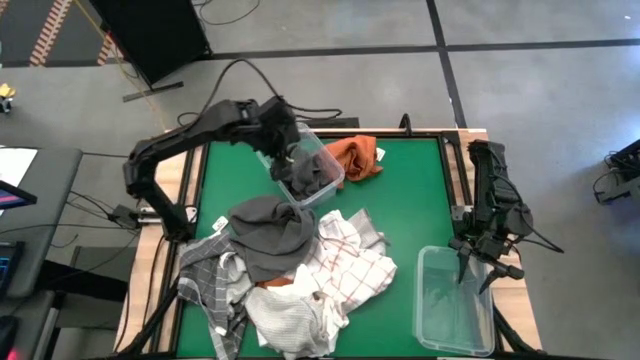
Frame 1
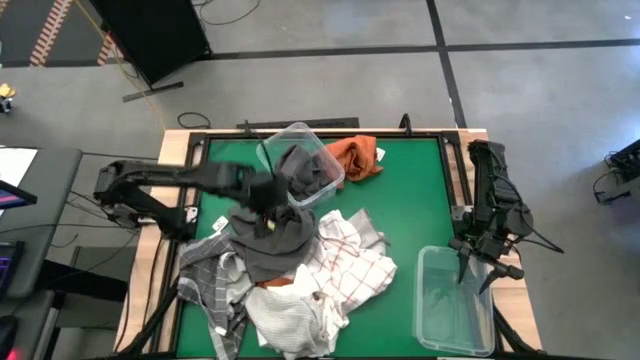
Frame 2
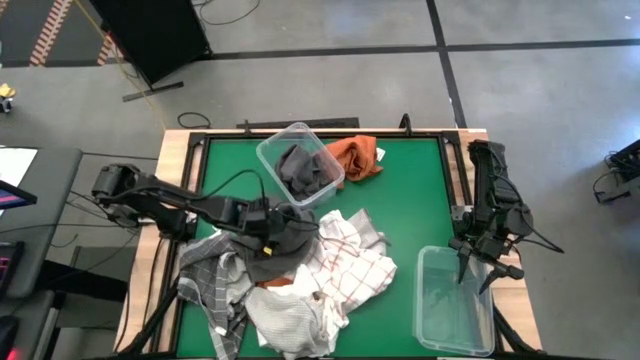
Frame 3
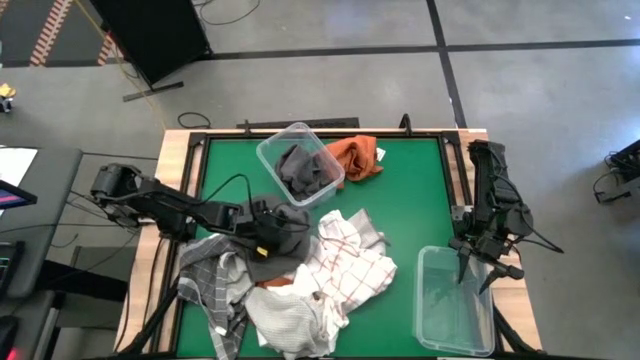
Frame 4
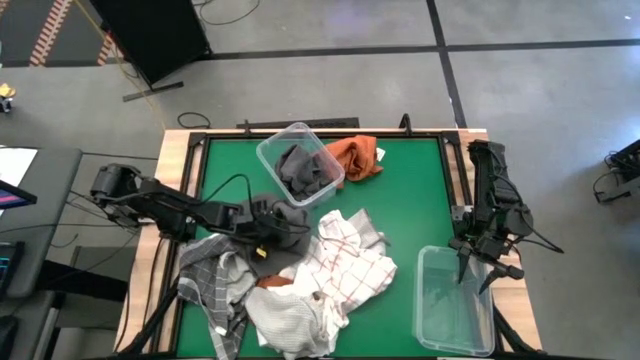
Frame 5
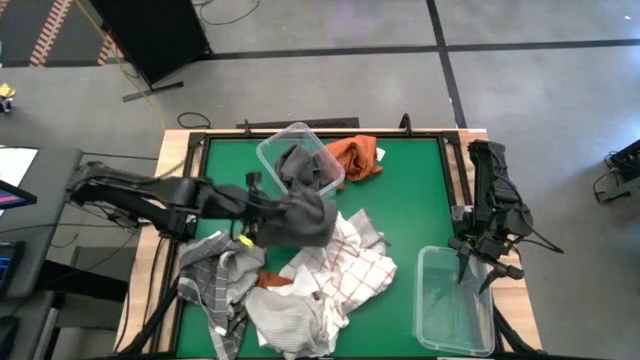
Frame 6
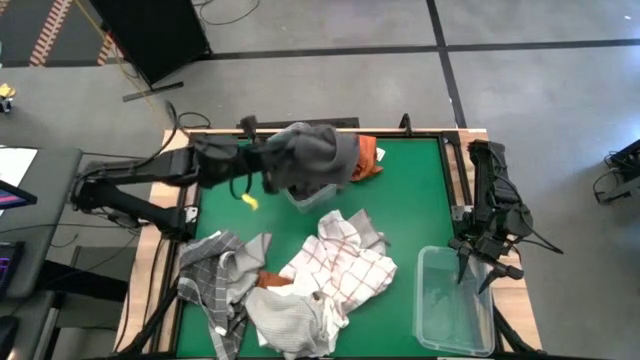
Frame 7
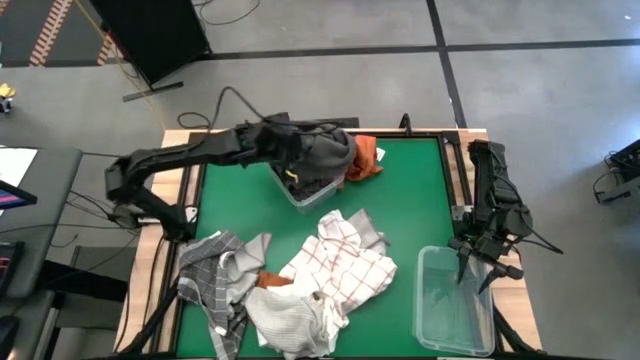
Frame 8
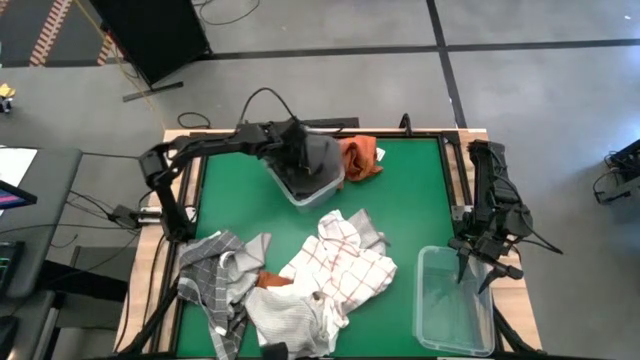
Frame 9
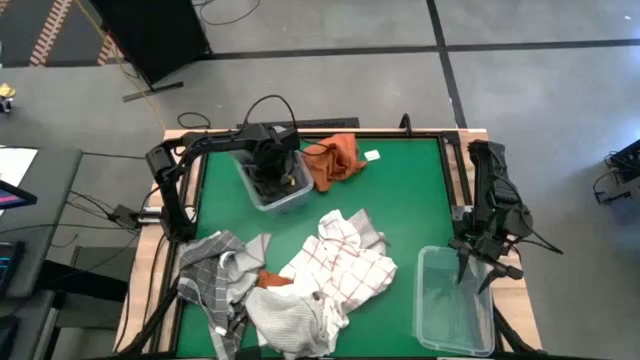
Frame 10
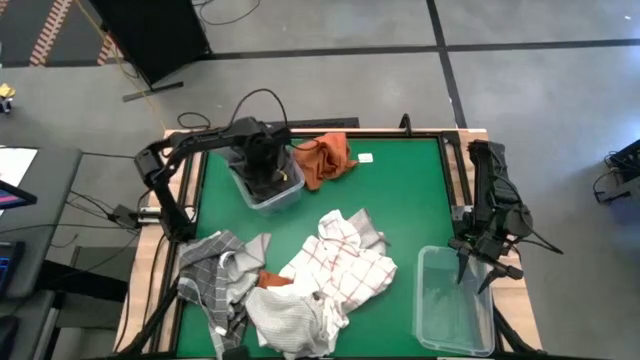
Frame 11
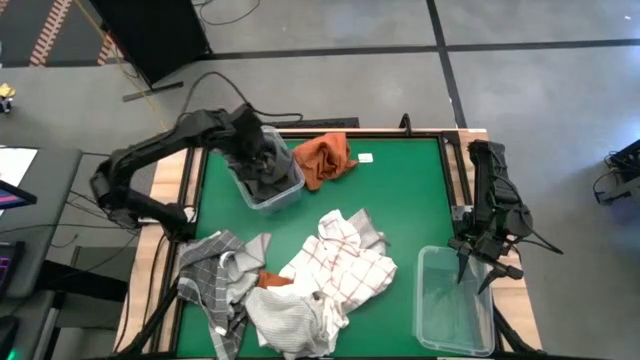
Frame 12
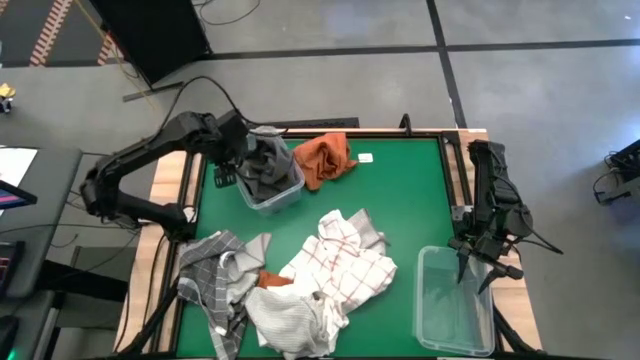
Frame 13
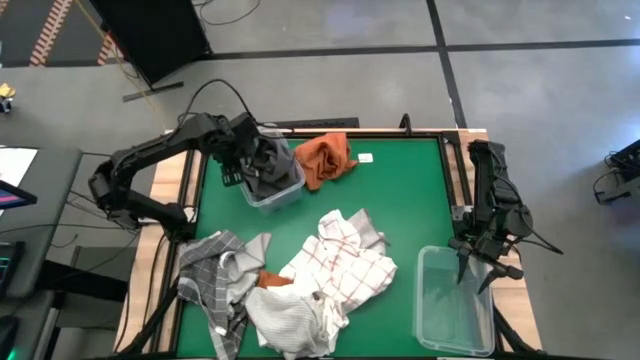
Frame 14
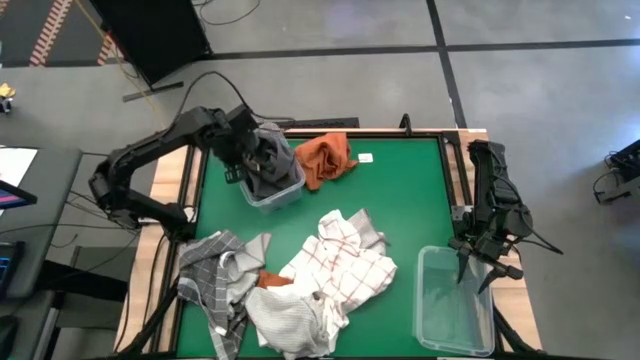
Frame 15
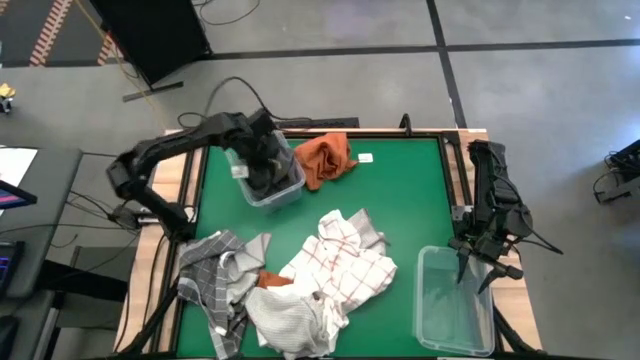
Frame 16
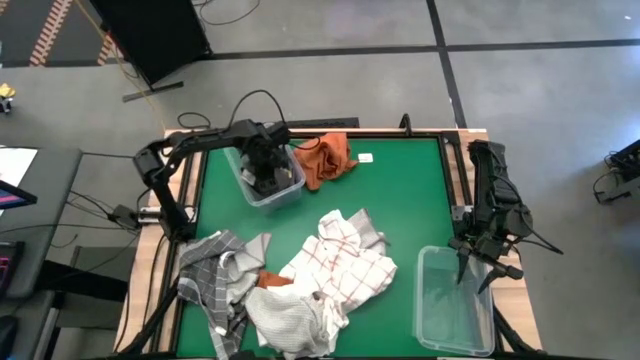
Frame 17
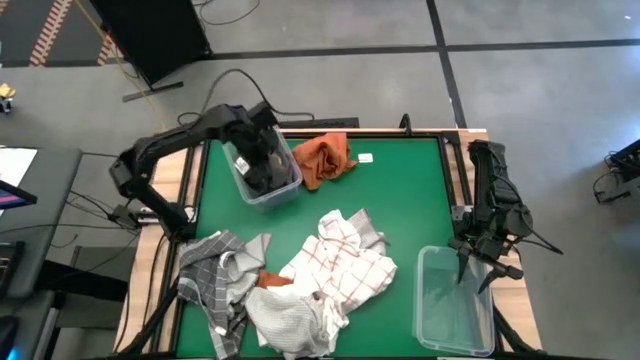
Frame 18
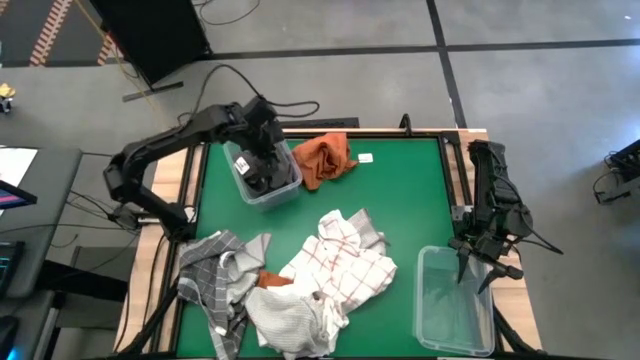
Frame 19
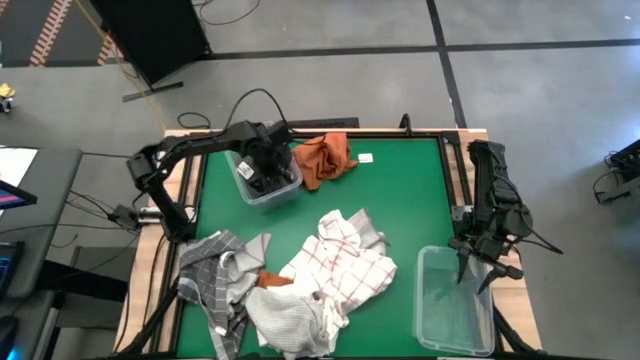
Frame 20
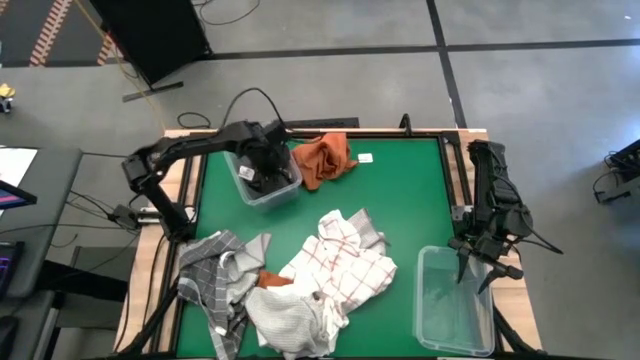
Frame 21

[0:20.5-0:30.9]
Task: Sort towels by color in basket
Put the gray towel into the top transparent bin

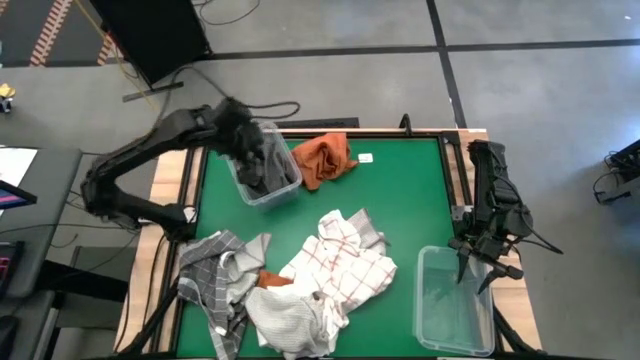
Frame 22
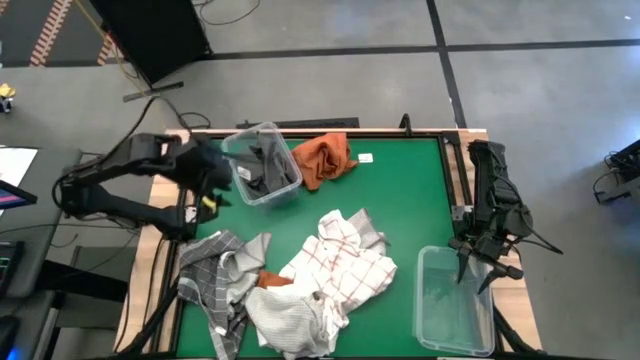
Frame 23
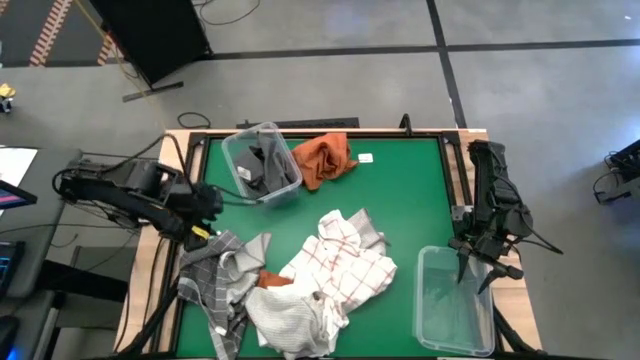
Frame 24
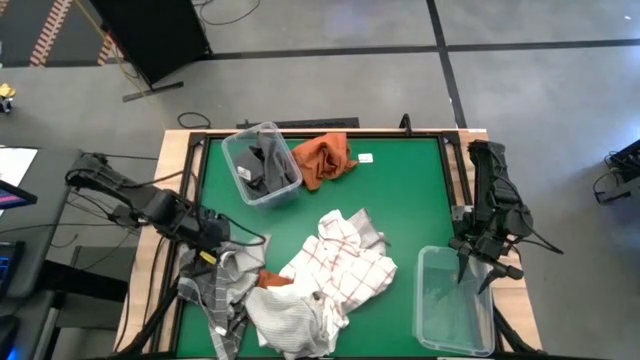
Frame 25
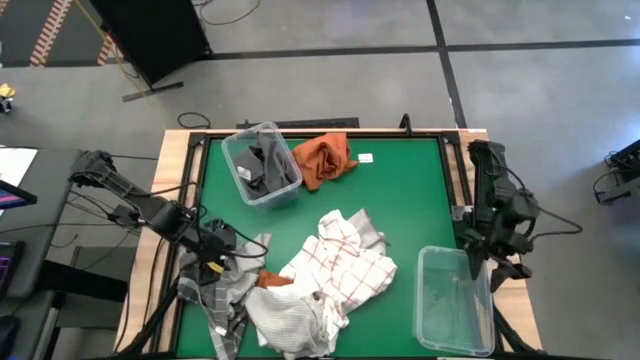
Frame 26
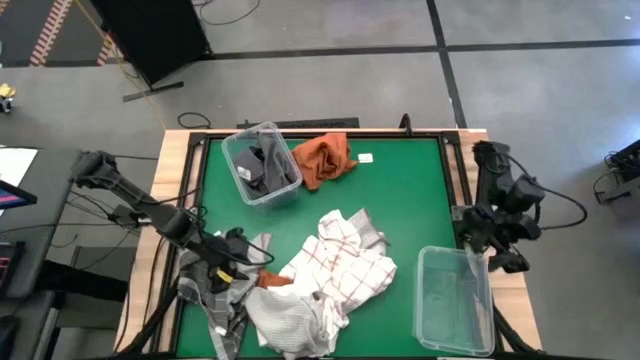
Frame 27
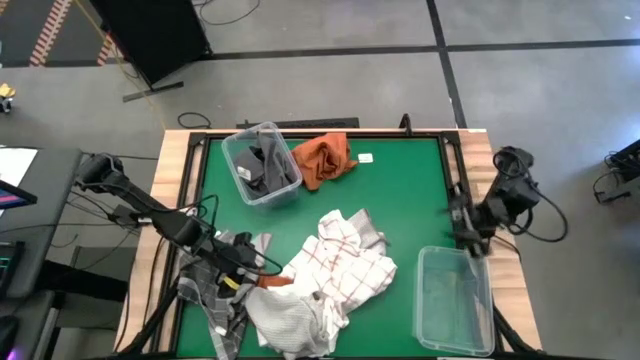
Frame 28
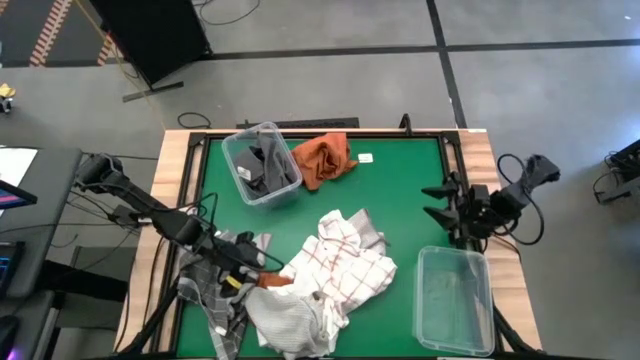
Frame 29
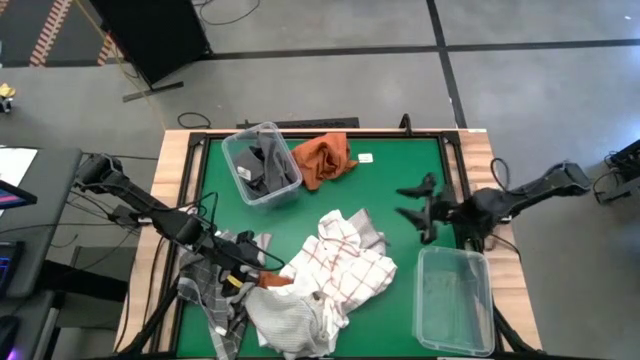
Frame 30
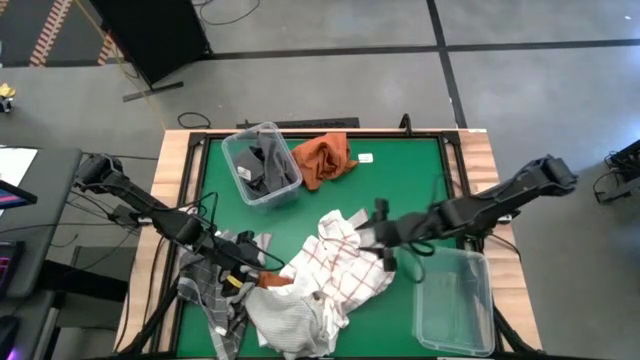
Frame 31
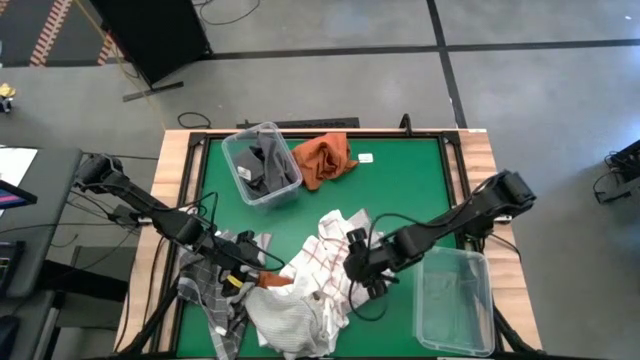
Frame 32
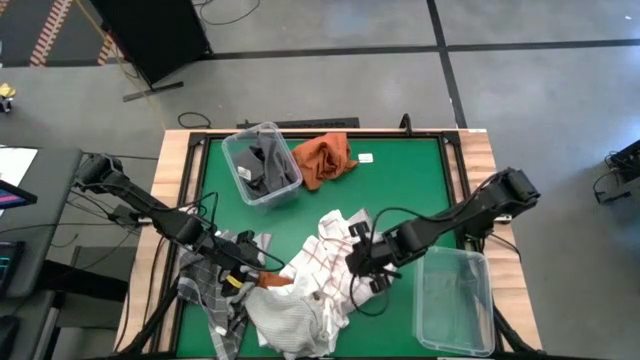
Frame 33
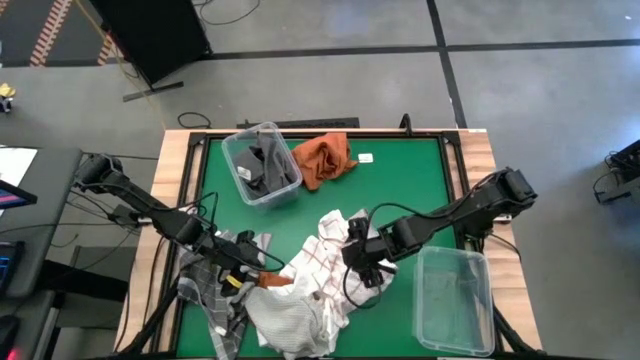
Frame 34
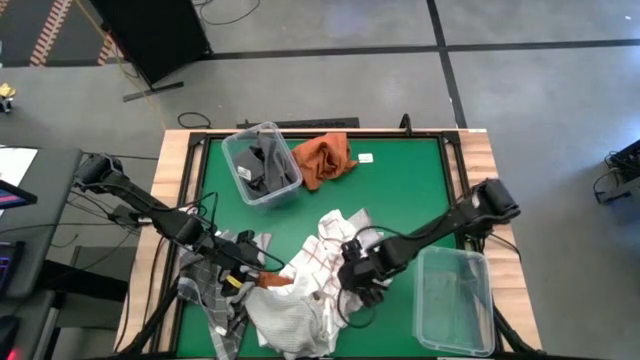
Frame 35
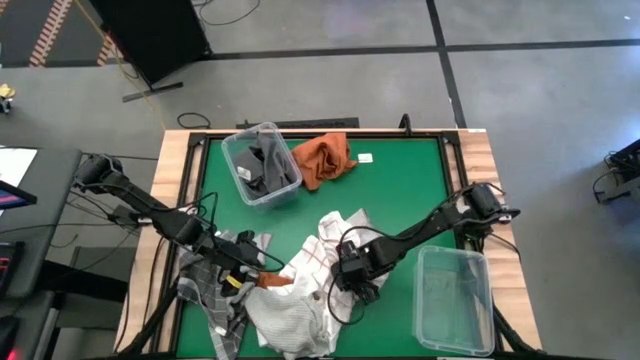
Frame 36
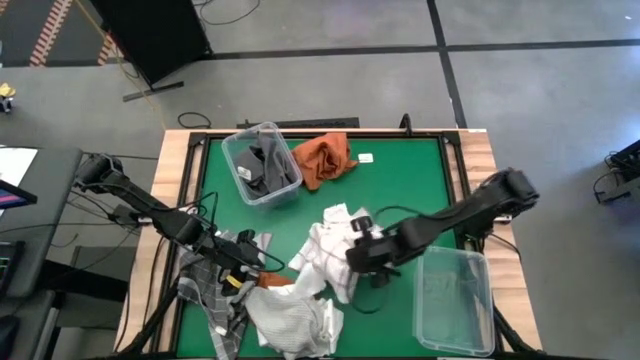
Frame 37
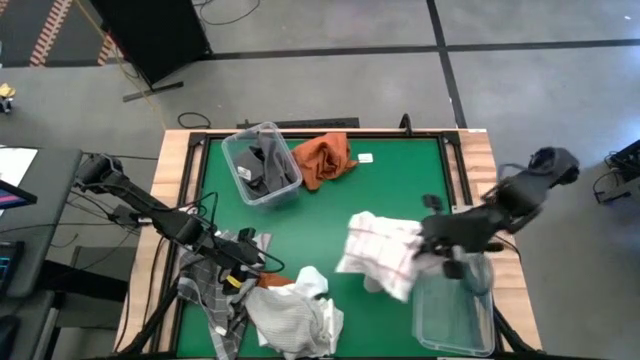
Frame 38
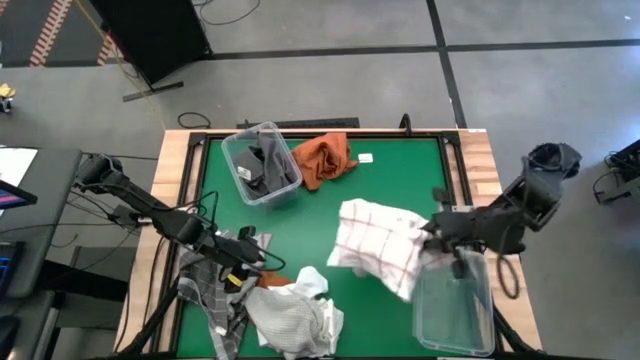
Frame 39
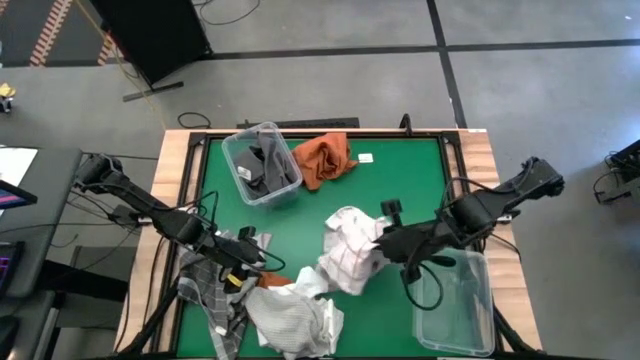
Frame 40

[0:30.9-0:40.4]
Put the white patterned towel into the bottom transparent bin

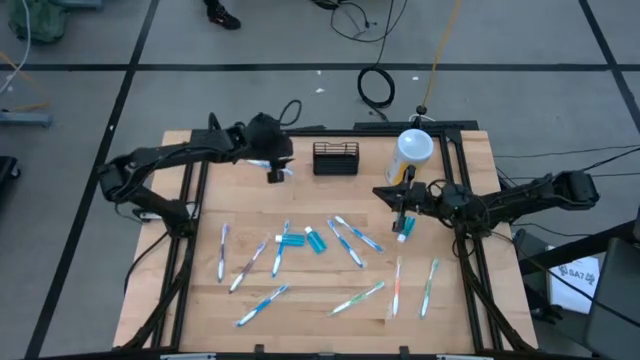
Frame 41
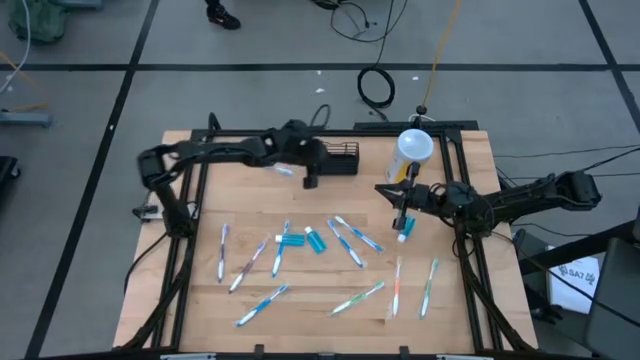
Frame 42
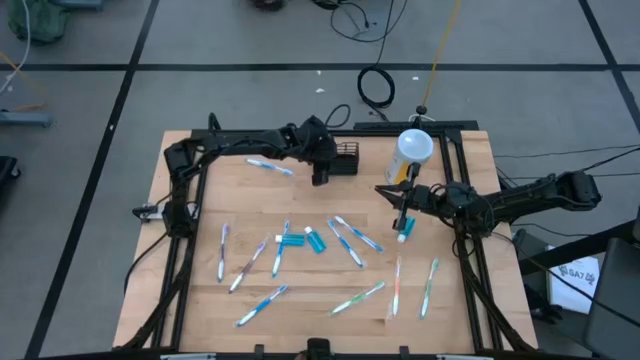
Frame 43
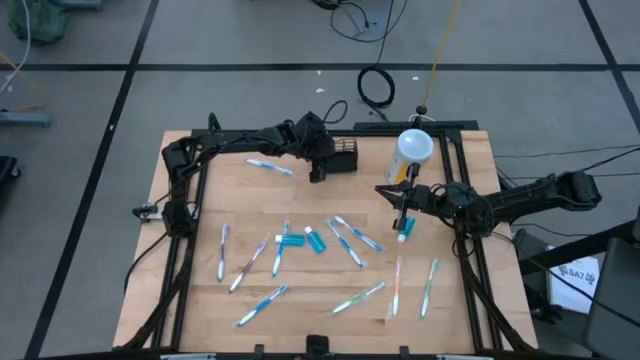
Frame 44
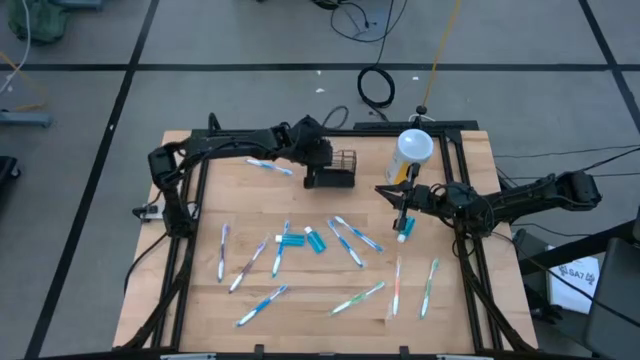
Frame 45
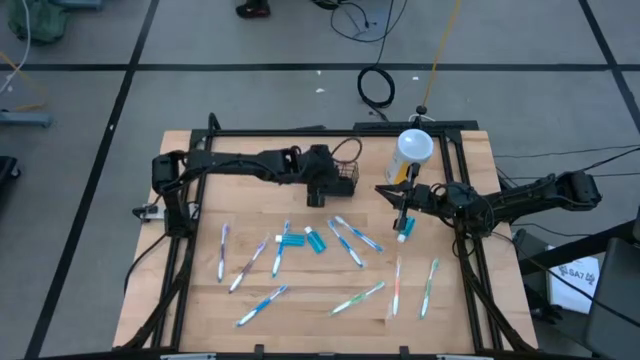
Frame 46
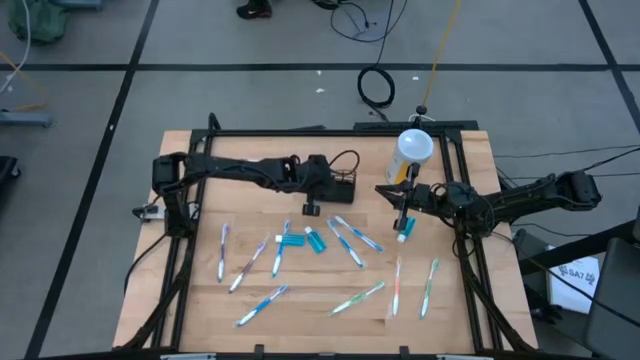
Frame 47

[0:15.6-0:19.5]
Task: Pick & Place toothbrushing station
Adjust the black wire organizer
